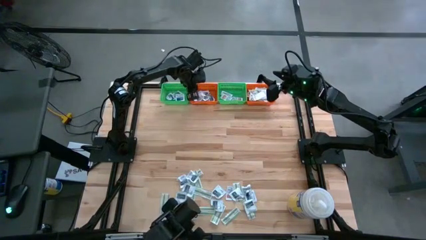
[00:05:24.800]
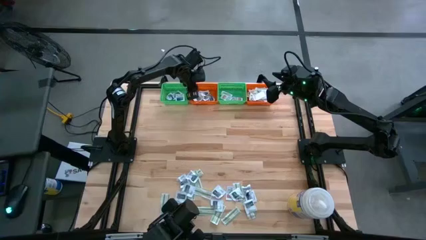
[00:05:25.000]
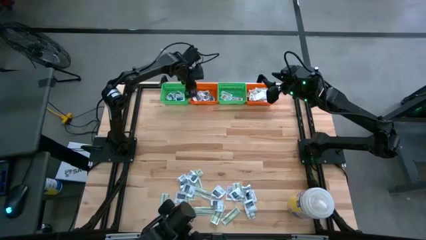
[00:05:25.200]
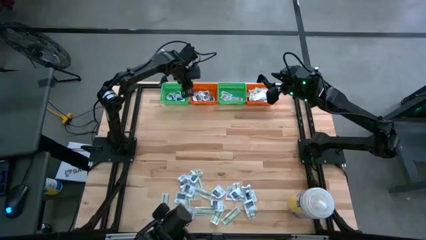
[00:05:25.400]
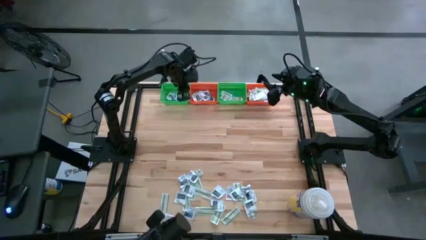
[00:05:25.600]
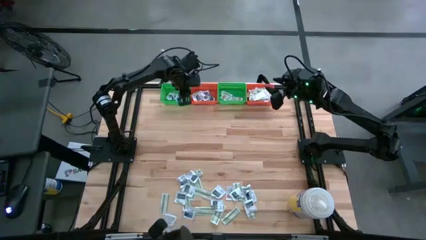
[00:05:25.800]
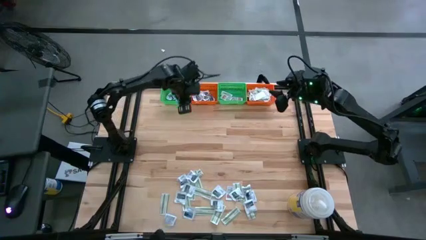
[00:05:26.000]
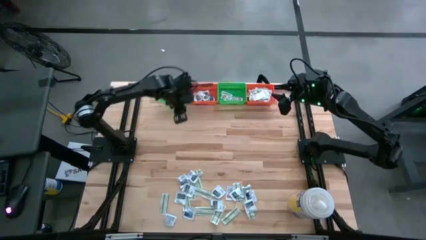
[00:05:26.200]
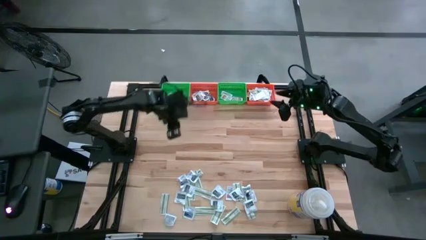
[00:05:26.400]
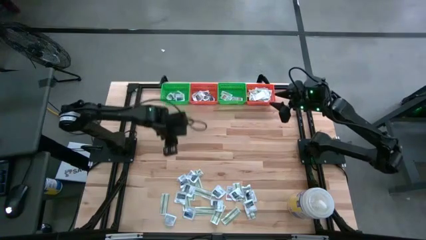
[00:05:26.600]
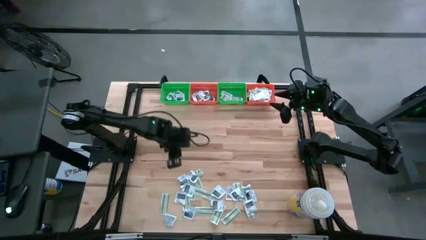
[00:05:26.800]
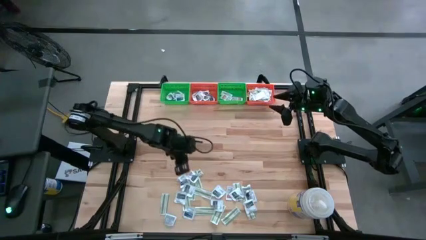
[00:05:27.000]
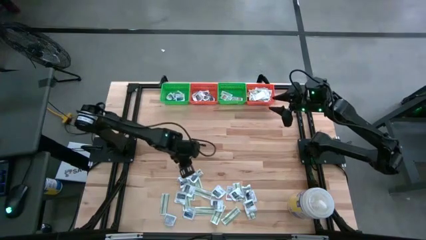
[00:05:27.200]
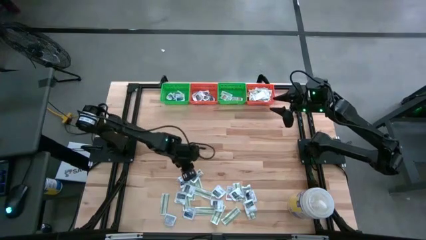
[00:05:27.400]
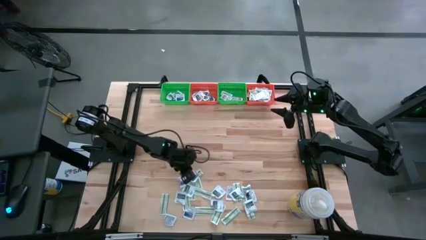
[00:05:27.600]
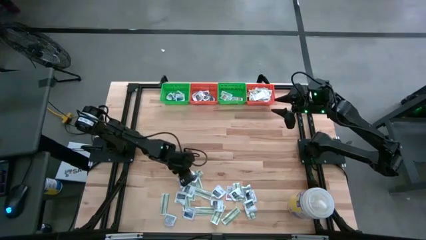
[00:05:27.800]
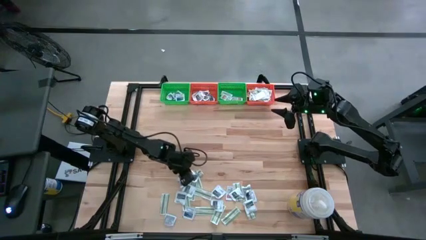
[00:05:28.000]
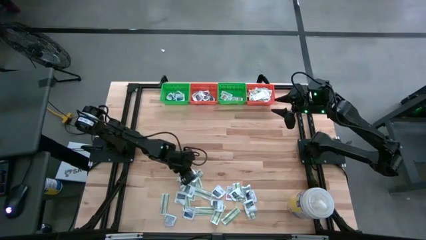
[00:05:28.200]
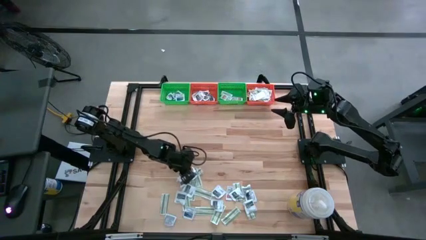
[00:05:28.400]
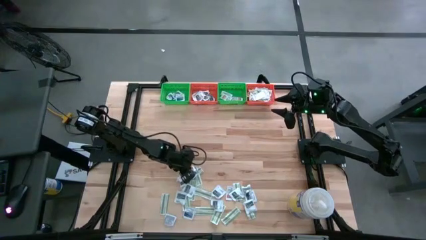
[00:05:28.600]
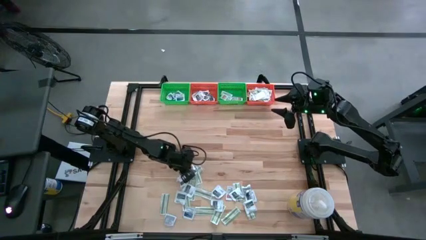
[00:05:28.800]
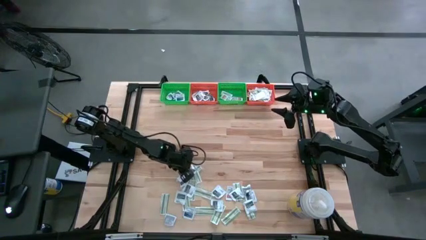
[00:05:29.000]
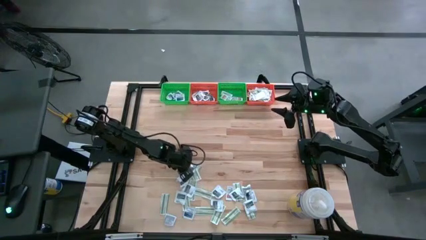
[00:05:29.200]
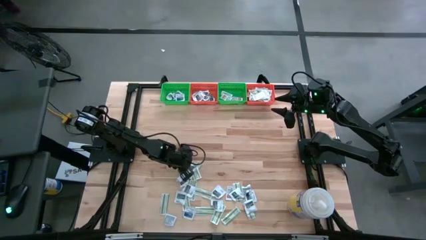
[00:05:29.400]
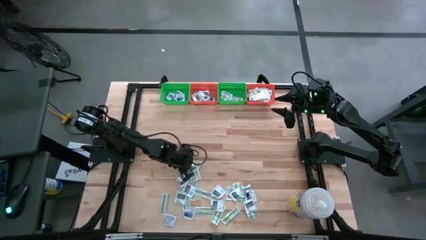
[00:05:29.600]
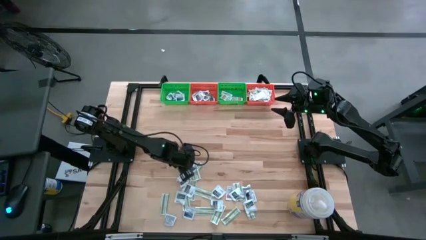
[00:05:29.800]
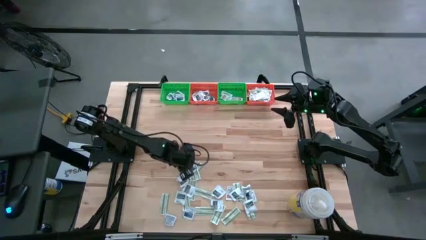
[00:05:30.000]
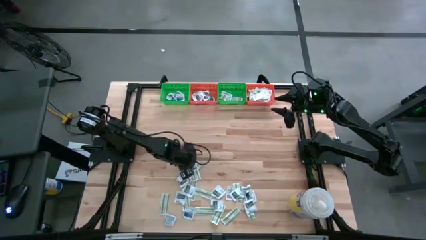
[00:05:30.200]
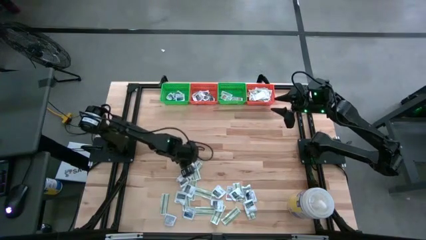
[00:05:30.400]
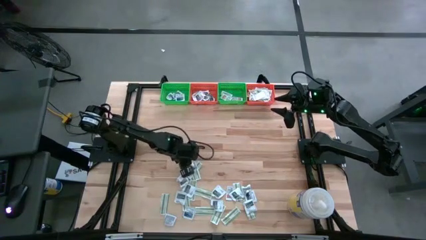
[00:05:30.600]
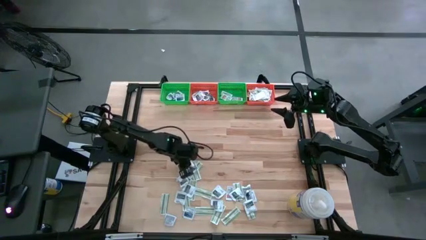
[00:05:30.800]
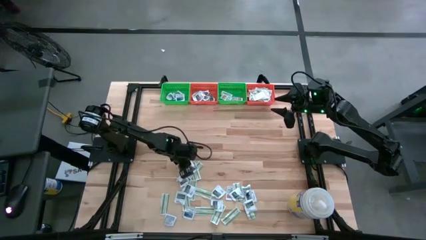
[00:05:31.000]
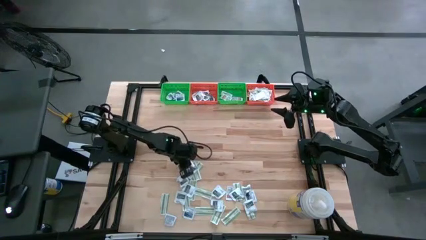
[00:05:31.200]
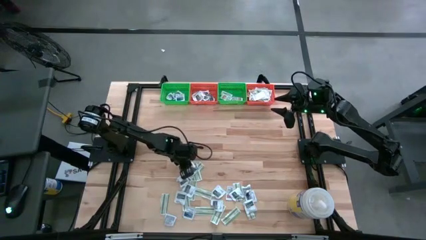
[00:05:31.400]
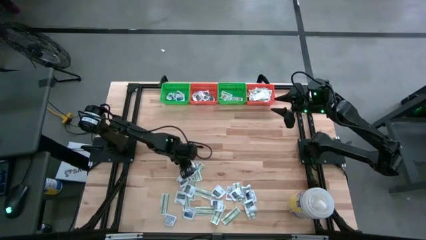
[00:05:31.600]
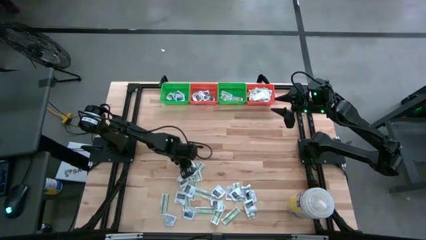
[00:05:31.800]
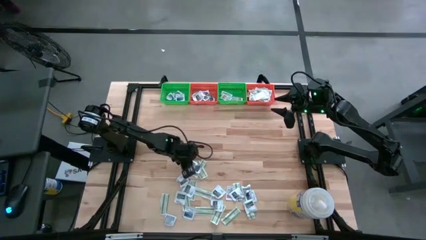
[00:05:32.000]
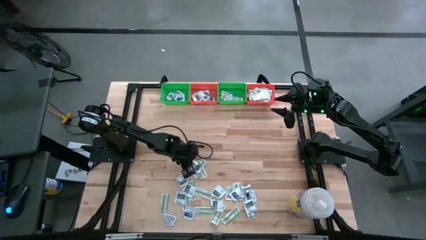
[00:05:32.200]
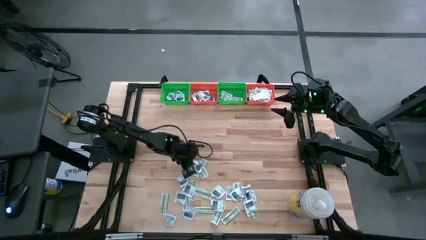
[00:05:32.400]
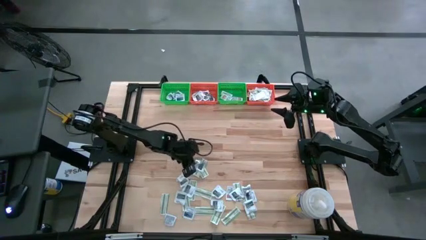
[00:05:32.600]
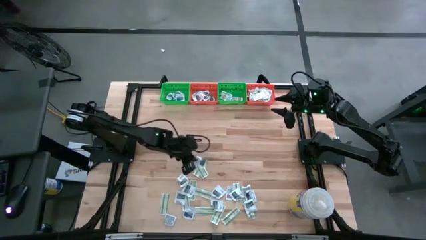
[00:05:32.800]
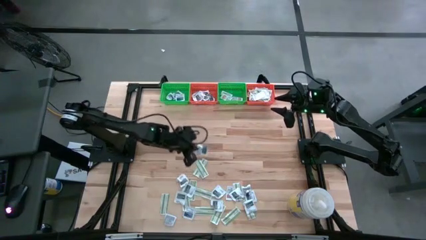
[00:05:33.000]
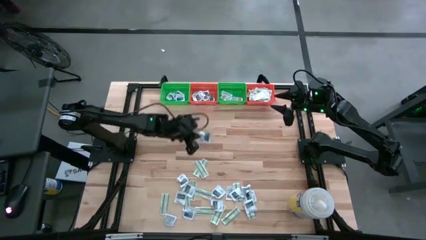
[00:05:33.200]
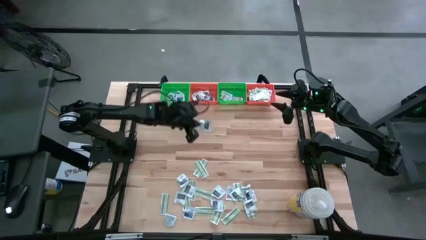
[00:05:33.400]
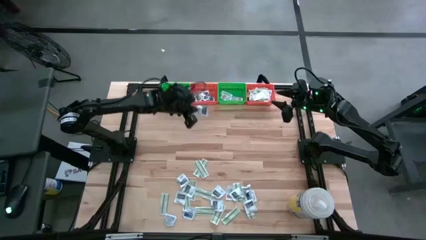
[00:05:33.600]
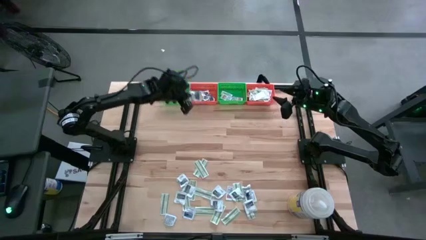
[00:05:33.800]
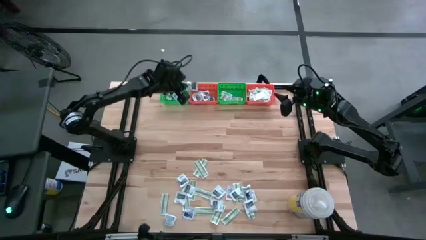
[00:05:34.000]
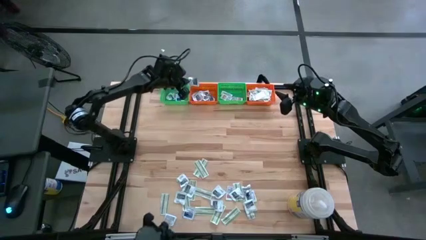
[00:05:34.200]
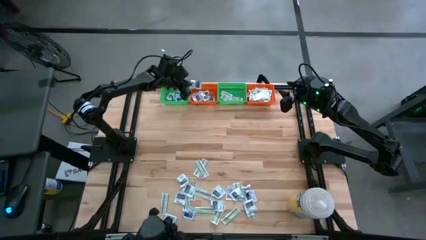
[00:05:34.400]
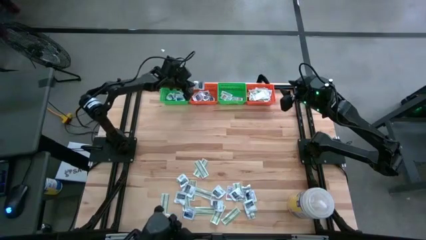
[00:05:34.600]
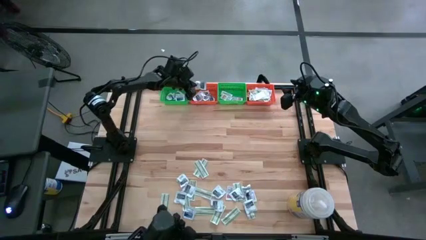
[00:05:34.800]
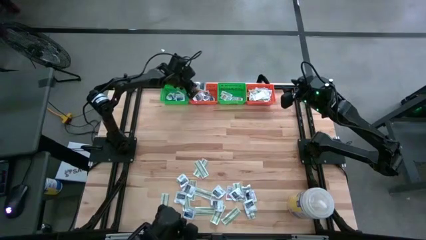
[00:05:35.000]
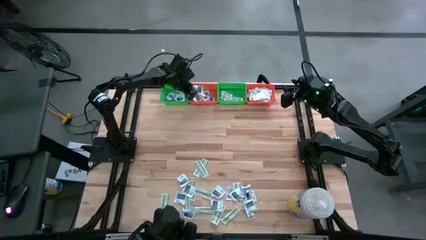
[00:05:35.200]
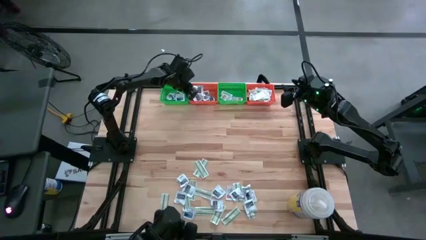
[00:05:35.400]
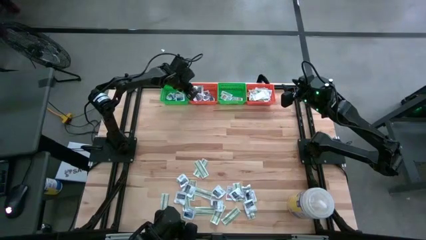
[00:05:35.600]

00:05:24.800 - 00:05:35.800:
Task: Pick & Place First Aid Supplies
Put the gray towelette pack in the left orange bin

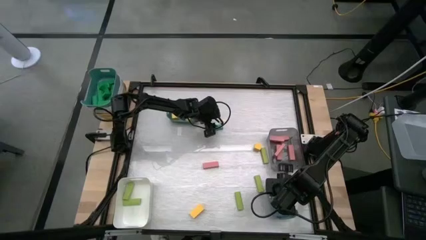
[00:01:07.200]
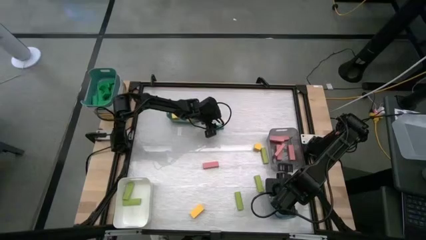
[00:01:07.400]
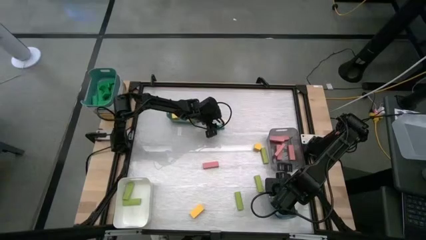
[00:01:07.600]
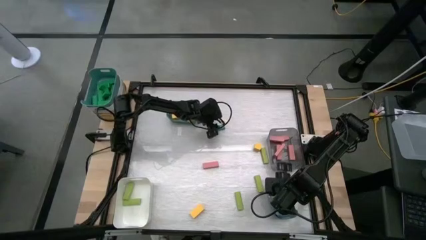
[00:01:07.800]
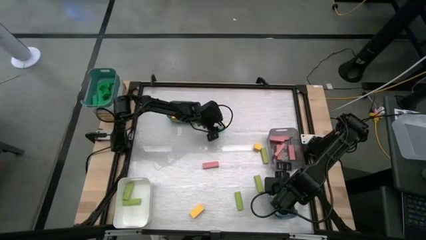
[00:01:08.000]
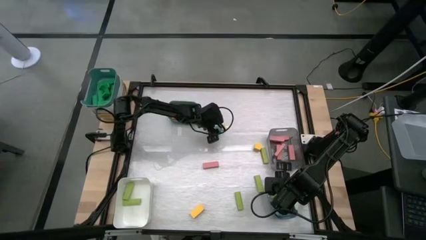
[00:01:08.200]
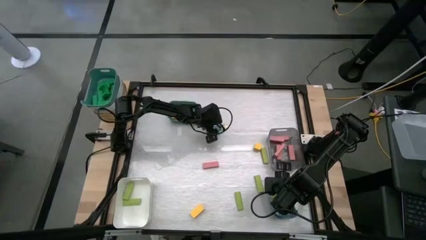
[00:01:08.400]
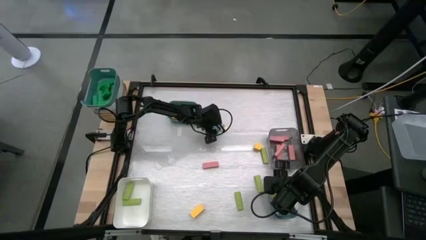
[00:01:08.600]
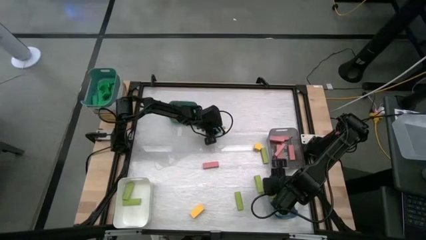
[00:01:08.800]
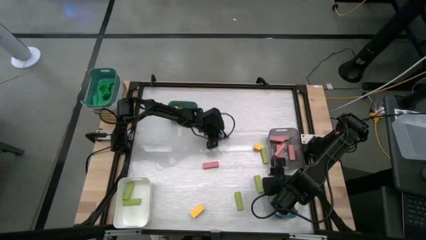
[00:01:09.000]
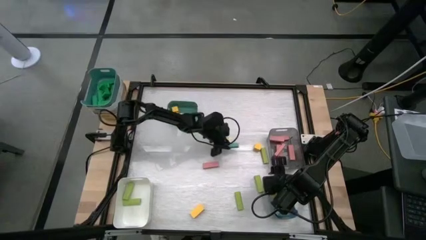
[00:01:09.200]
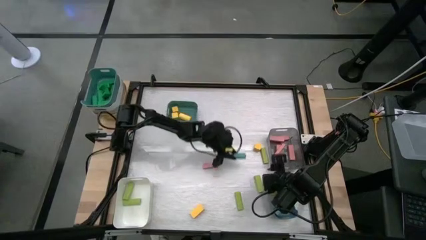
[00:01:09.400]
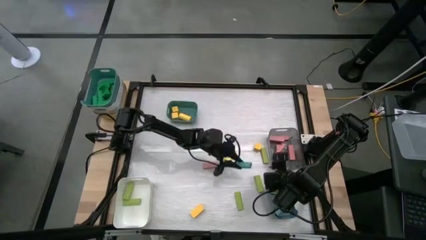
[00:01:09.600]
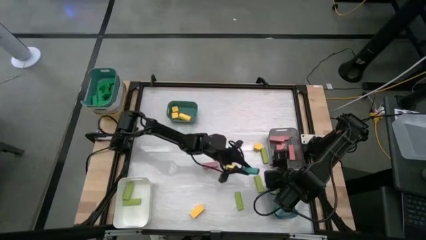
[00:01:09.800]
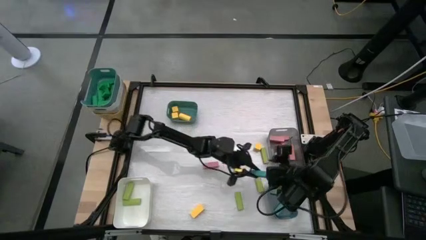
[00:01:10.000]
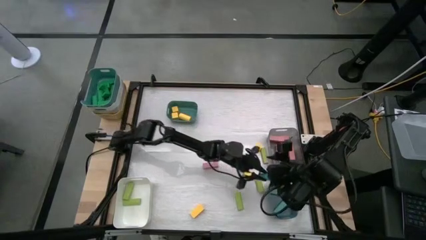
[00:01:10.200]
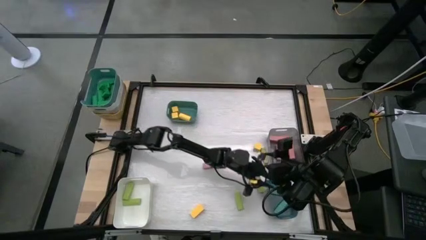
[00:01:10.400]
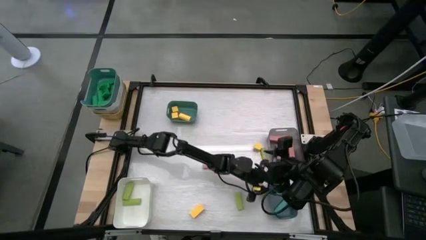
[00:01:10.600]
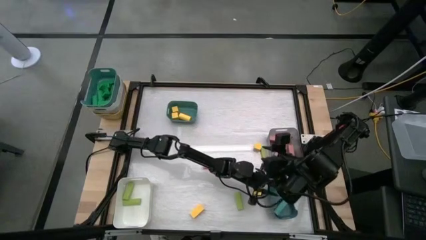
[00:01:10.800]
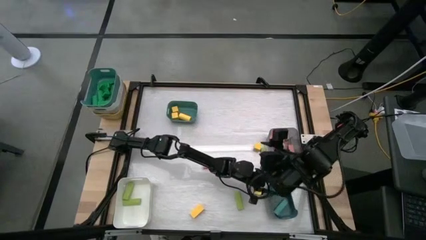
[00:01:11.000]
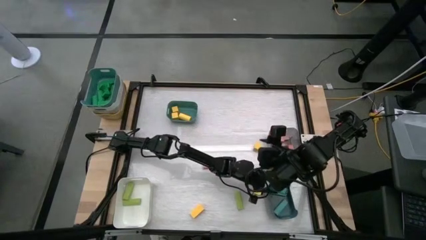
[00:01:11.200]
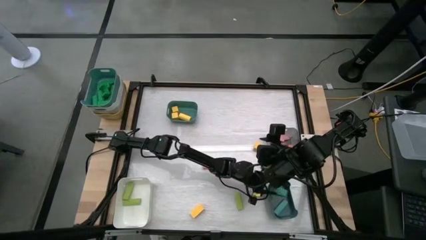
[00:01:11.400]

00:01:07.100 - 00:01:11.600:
Task: Sort blocks
Put the blue block into the blue bin
